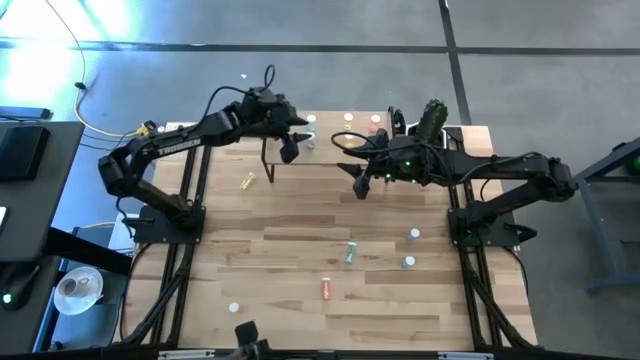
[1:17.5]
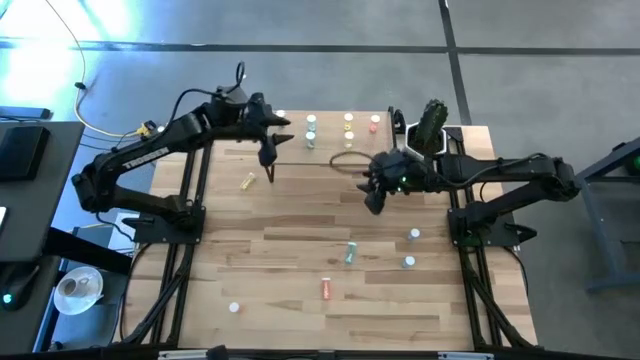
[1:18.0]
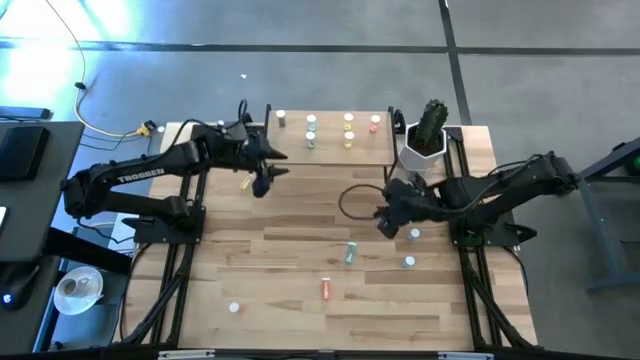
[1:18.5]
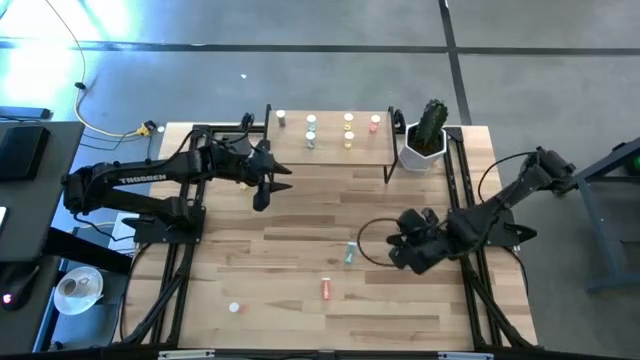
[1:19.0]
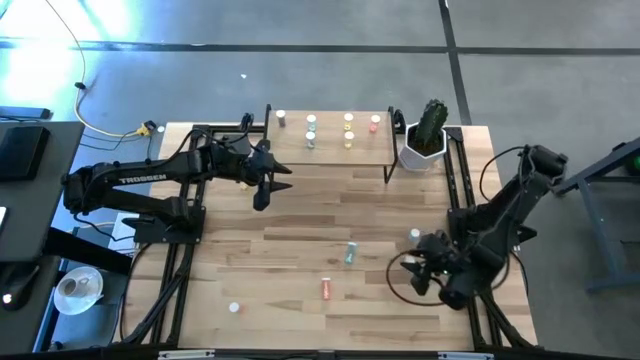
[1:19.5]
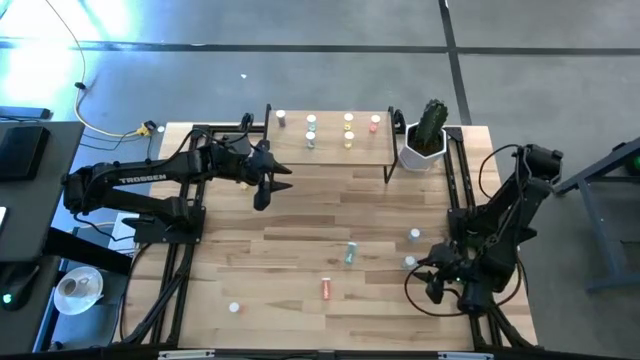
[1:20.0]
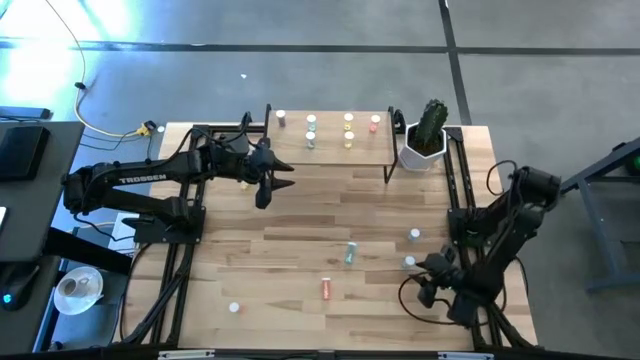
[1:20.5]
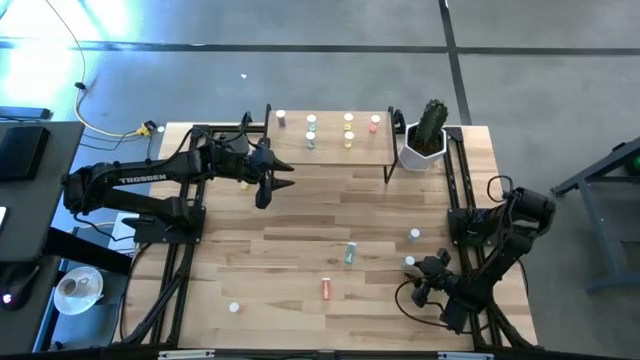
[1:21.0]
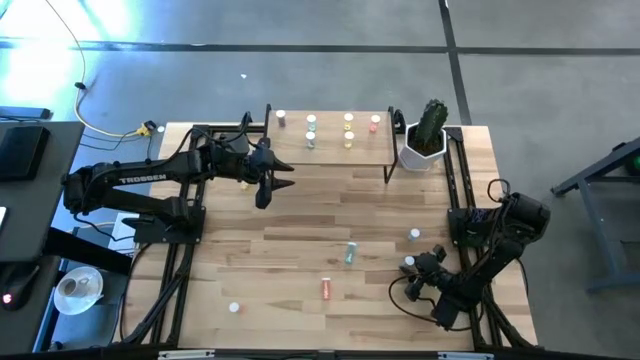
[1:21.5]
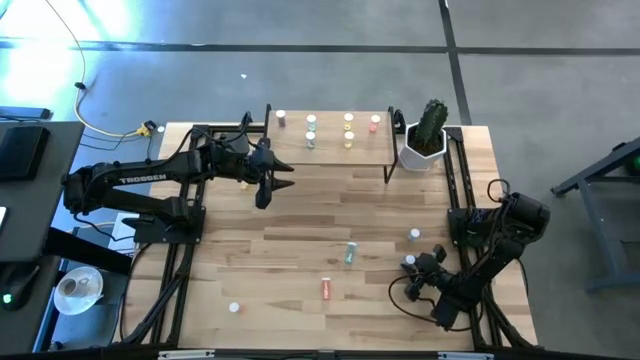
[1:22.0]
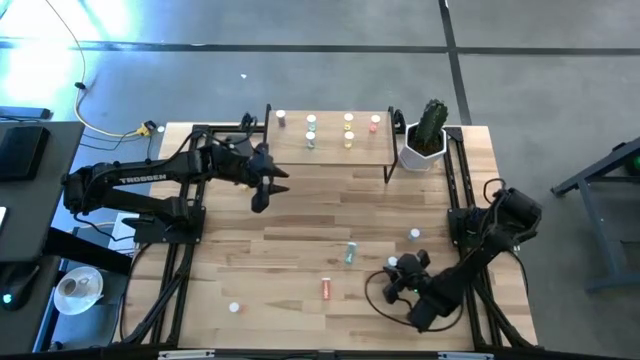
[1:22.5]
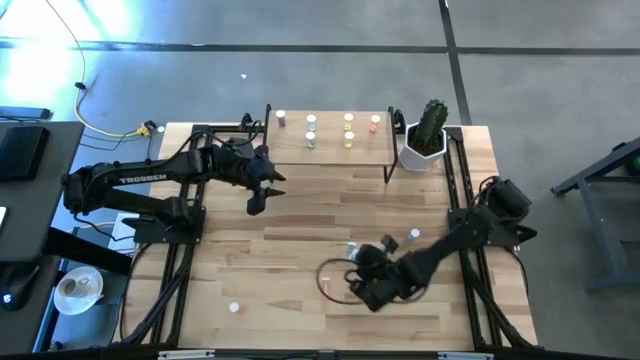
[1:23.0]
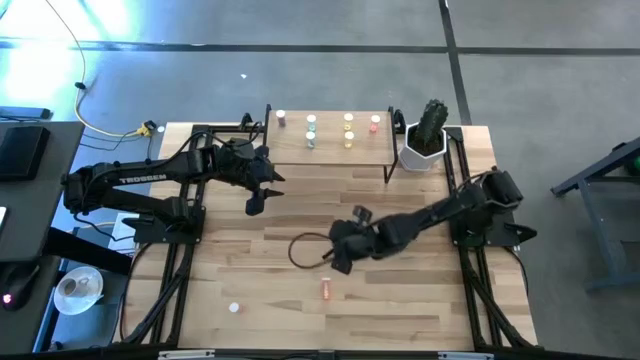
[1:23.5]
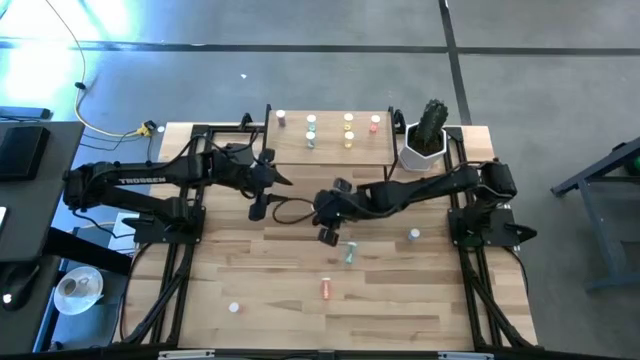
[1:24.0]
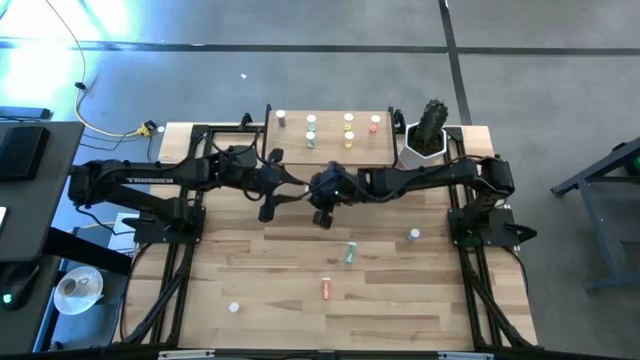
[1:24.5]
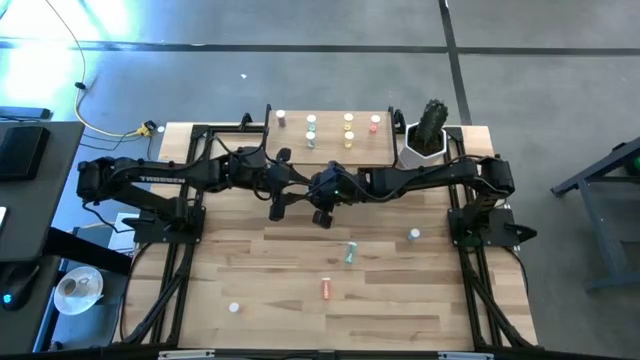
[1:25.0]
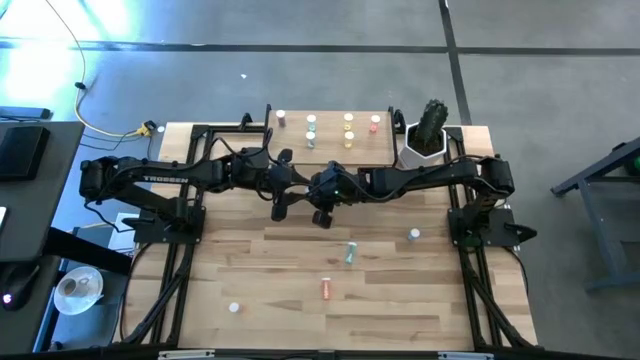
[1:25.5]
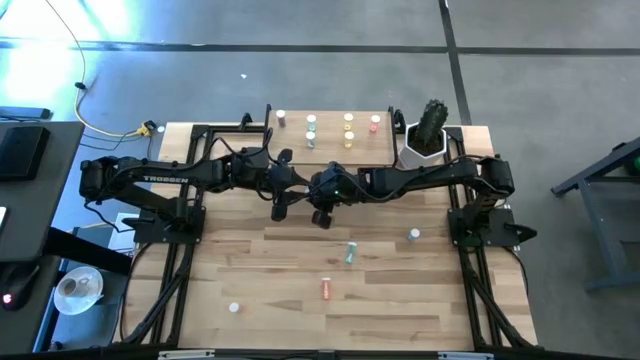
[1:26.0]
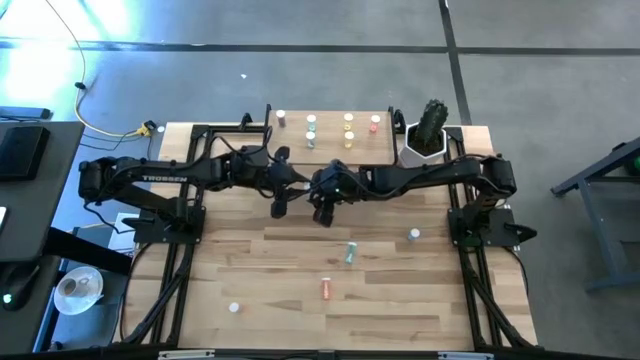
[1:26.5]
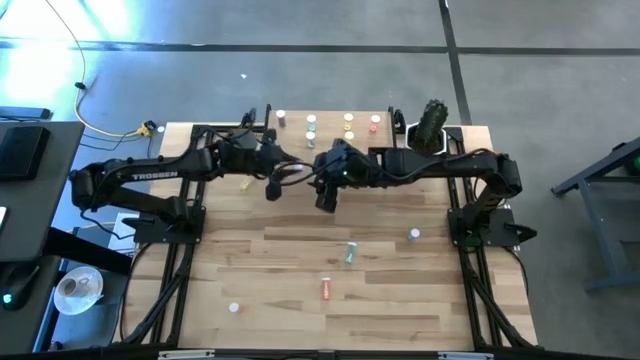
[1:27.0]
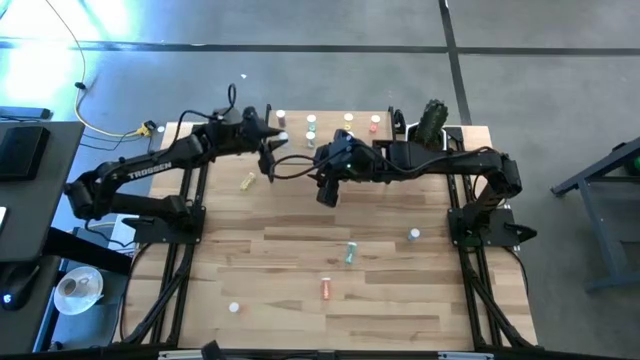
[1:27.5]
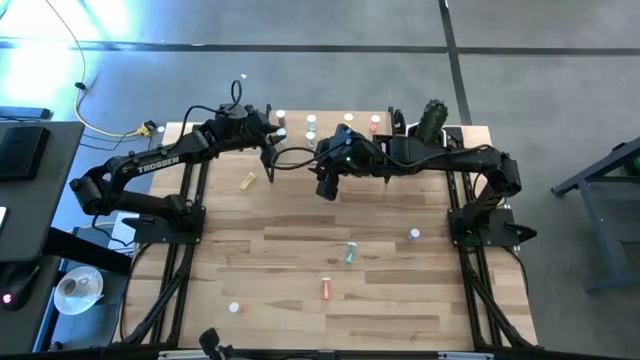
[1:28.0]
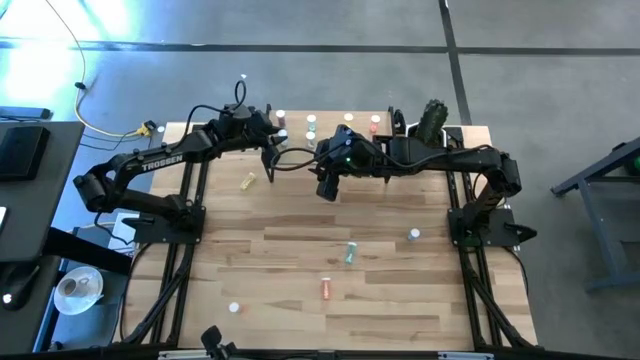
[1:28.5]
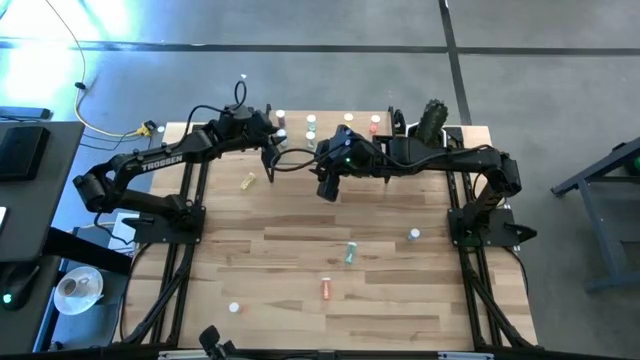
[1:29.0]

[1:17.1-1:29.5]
Task: Pick and place medicine bottles onto shelf by color
Put the bottom right blue pill bottle on the shelf aligned with the other blue pill bottles

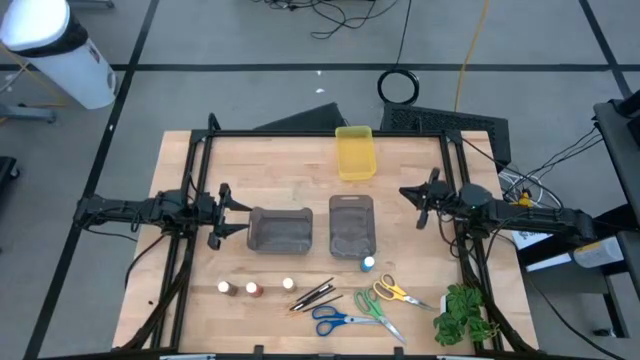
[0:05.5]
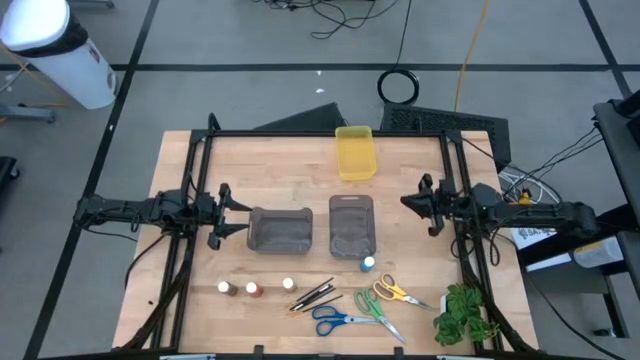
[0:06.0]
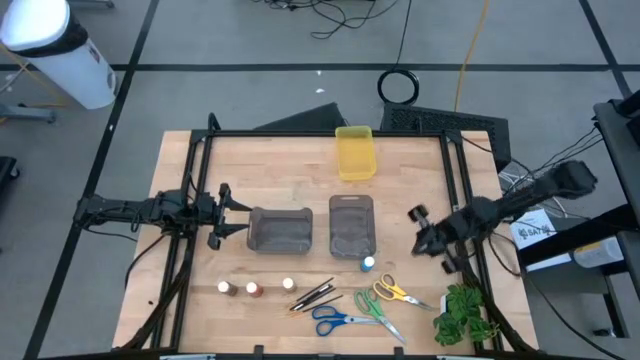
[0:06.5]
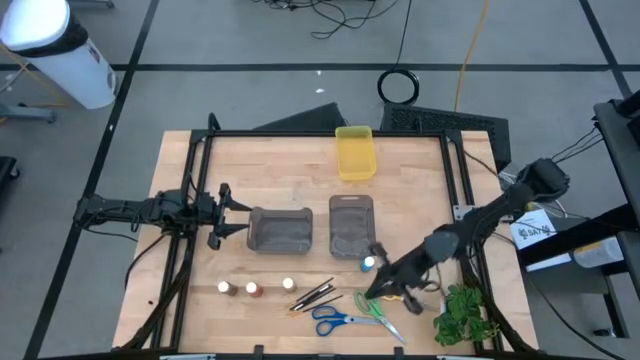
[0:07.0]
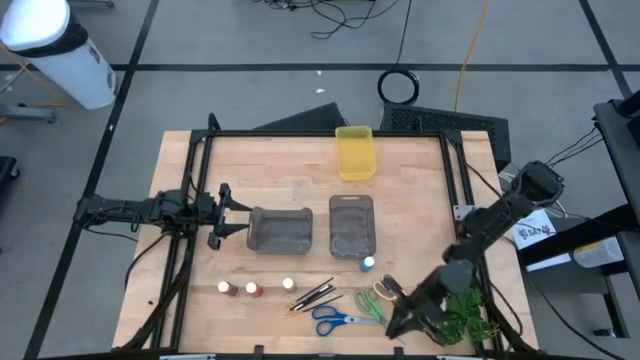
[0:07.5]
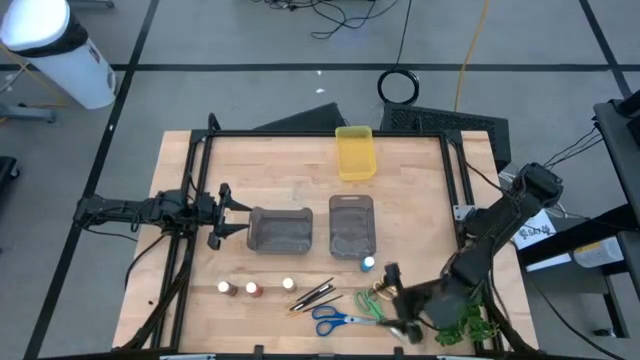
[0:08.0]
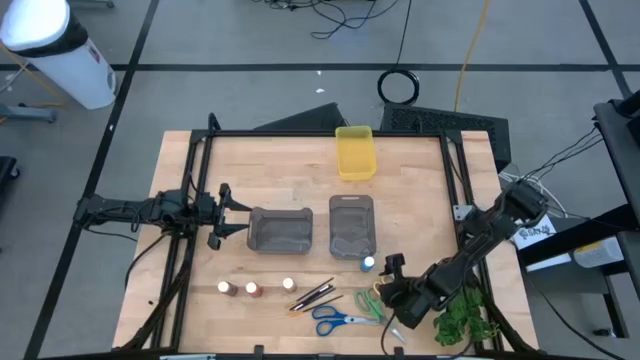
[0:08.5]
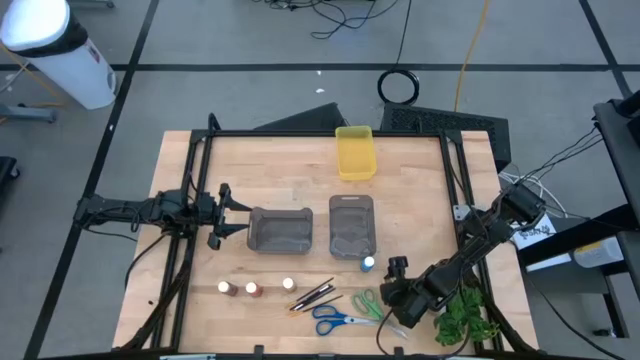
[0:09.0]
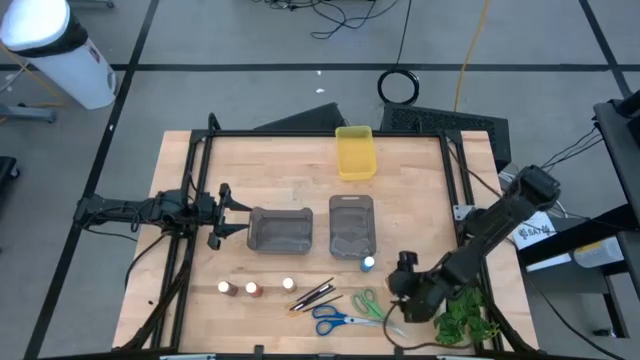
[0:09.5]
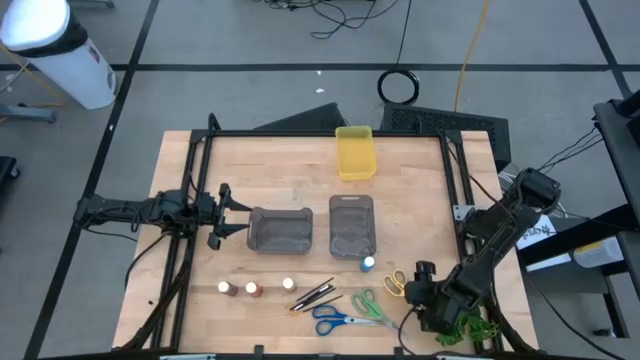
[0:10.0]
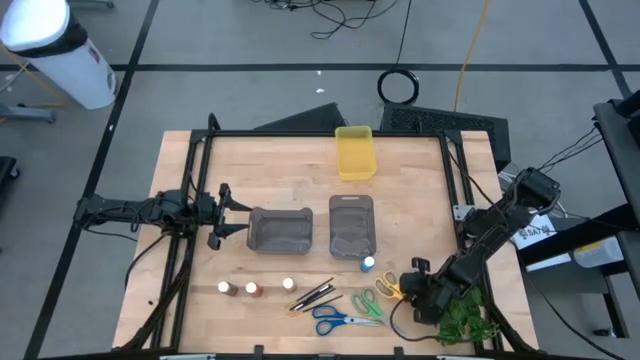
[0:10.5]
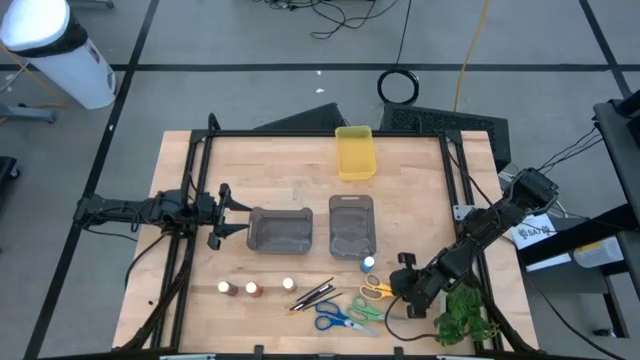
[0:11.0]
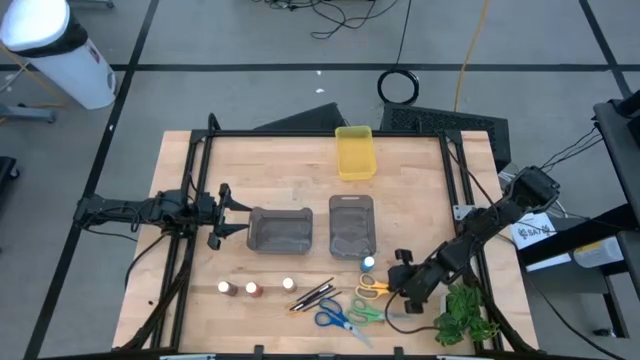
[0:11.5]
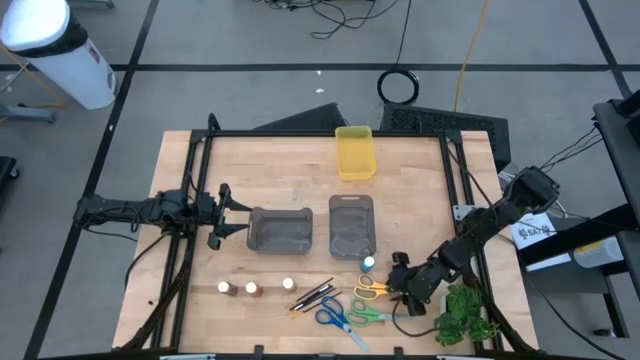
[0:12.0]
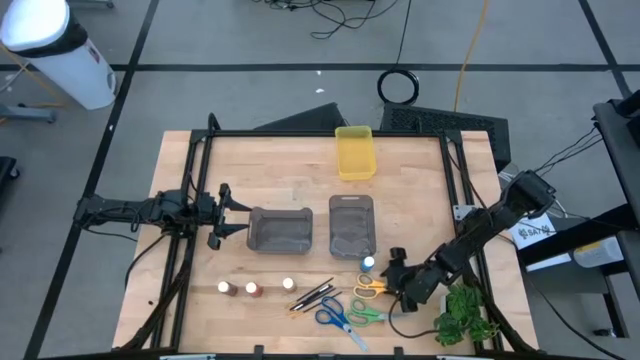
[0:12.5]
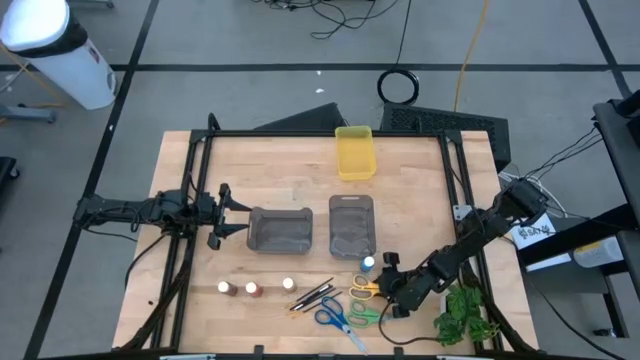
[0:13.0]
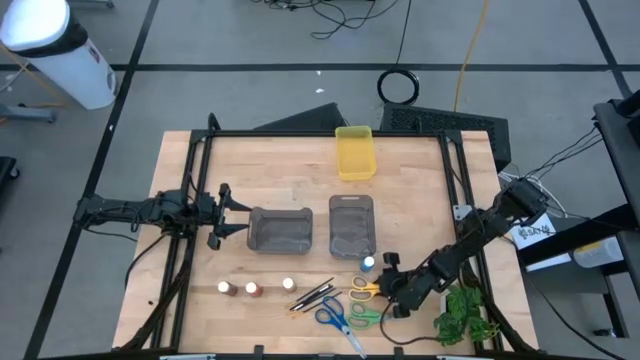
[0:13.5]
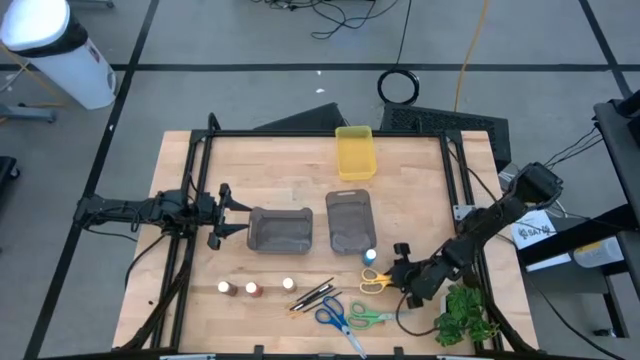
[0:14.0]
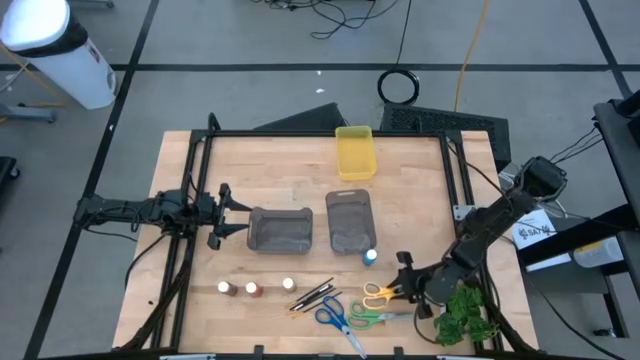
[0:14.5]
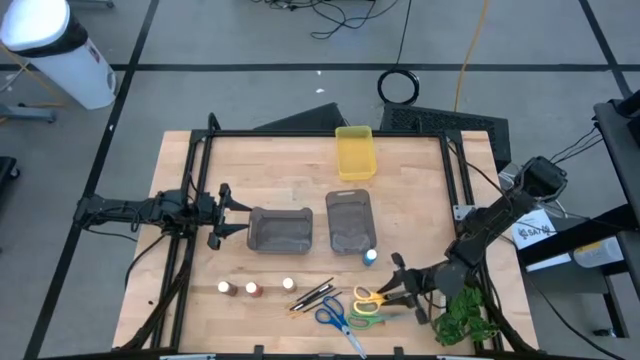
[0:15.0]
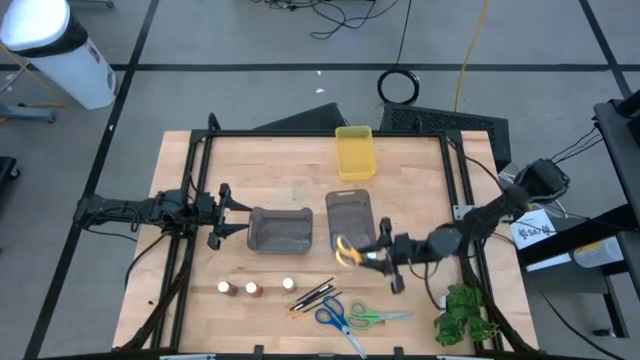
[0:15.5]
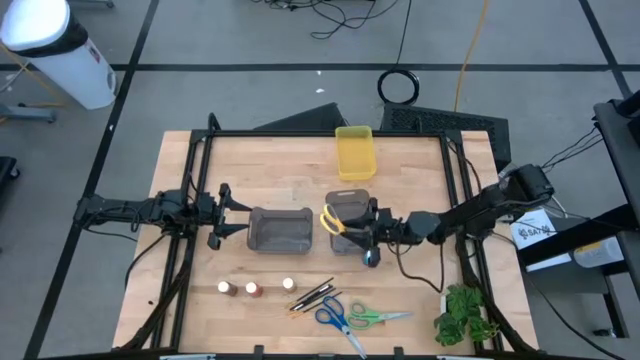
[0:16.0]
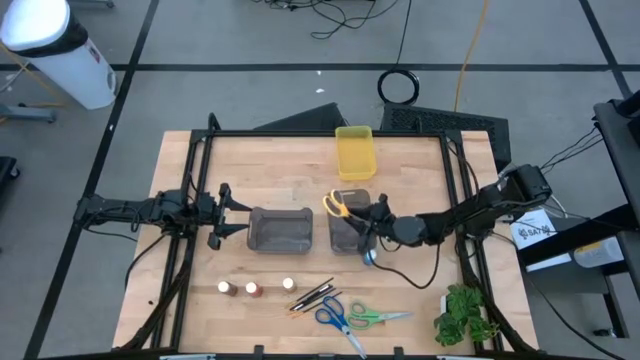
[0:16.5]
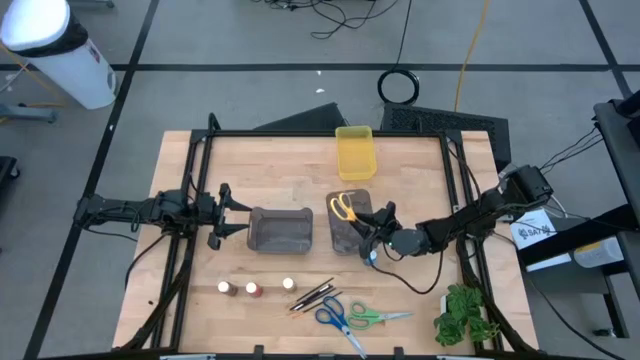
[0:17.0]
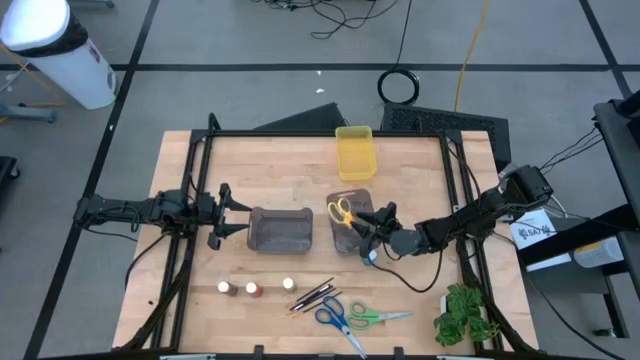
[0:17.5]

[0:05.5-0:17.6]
Task: Pick & Place Paint Supplies
Put the yellow scissors into the right black bin
